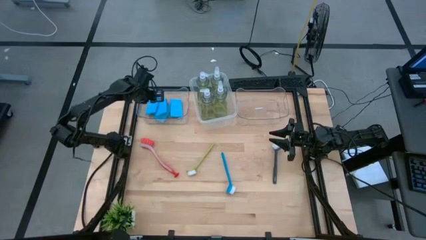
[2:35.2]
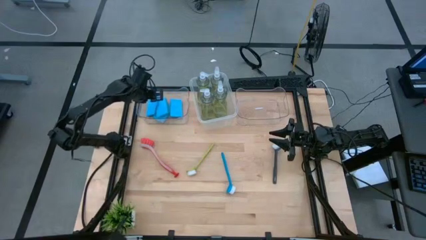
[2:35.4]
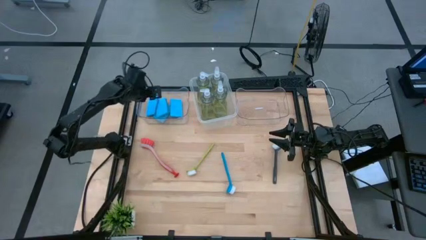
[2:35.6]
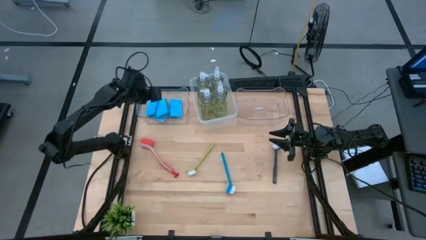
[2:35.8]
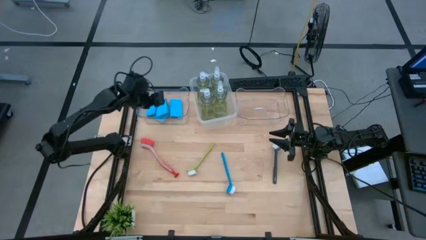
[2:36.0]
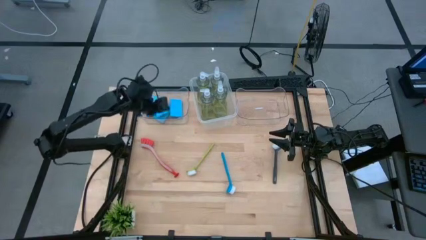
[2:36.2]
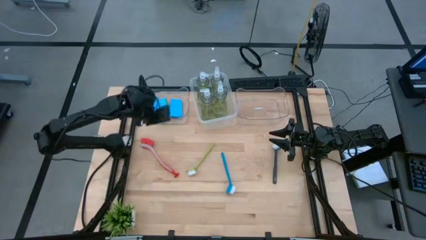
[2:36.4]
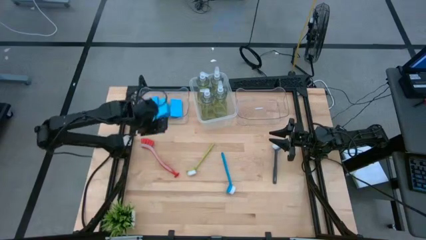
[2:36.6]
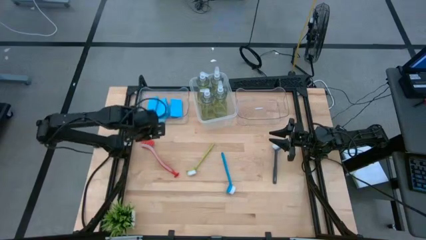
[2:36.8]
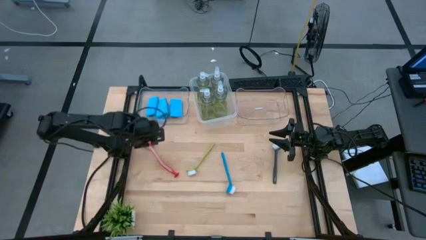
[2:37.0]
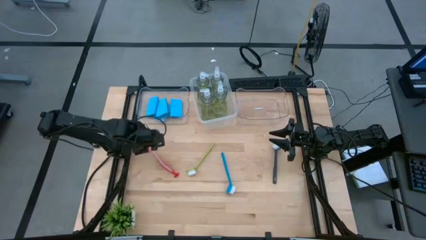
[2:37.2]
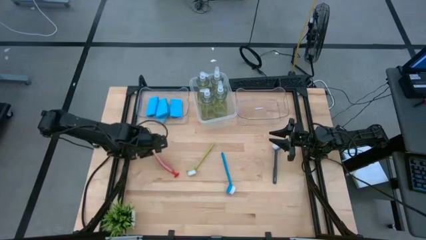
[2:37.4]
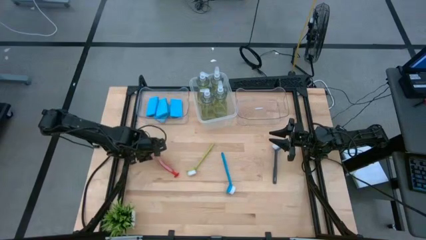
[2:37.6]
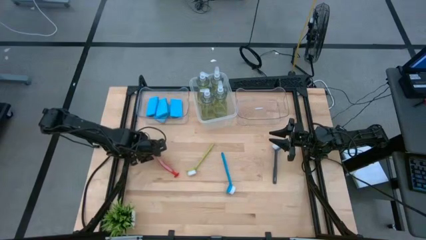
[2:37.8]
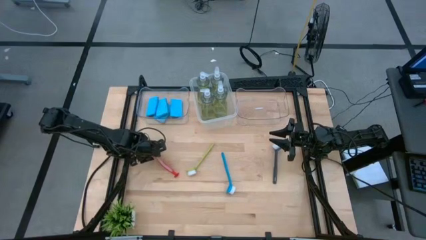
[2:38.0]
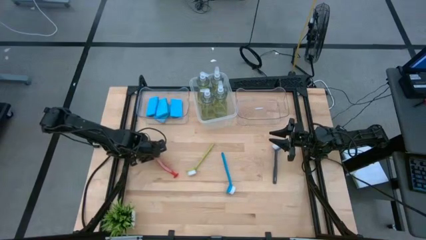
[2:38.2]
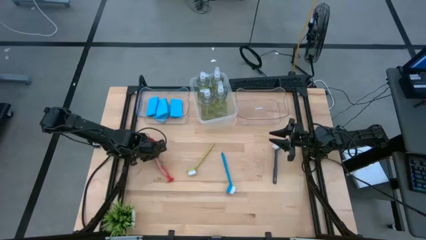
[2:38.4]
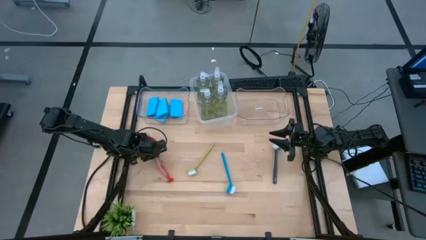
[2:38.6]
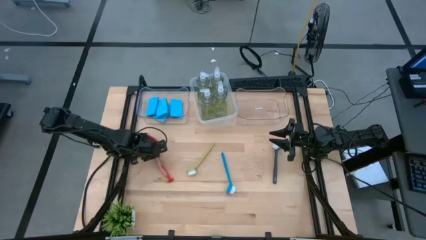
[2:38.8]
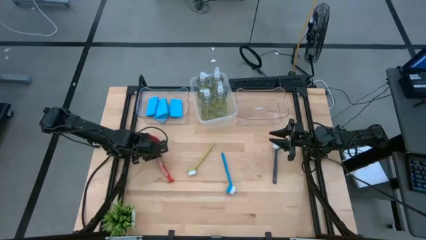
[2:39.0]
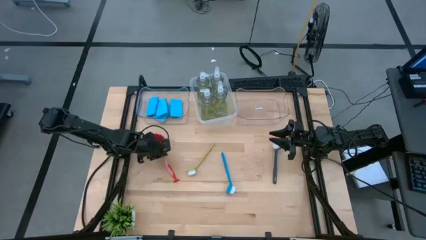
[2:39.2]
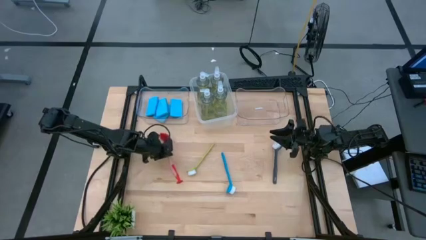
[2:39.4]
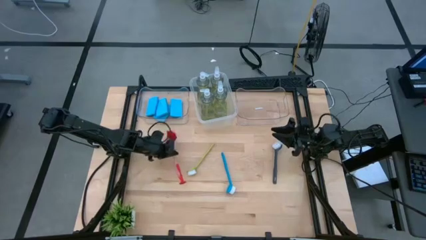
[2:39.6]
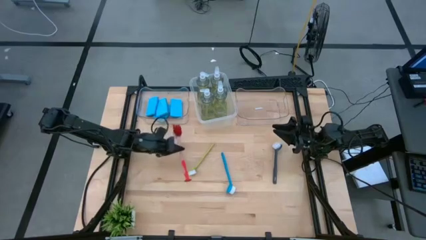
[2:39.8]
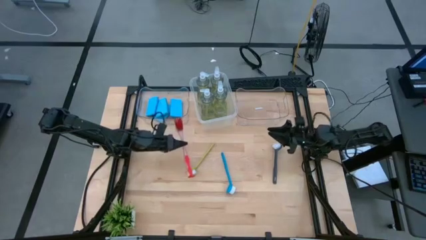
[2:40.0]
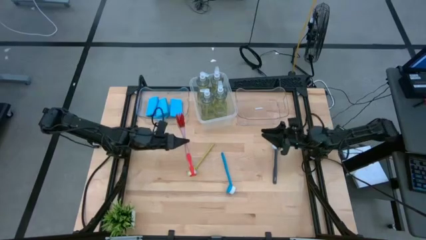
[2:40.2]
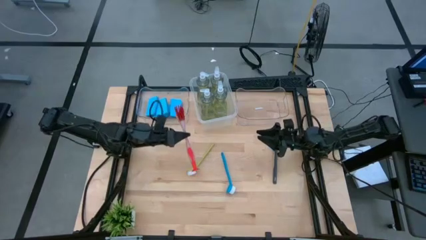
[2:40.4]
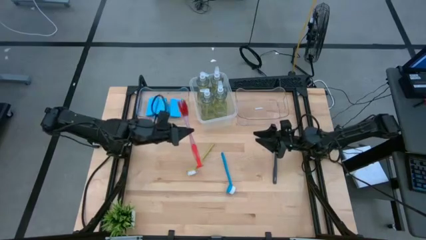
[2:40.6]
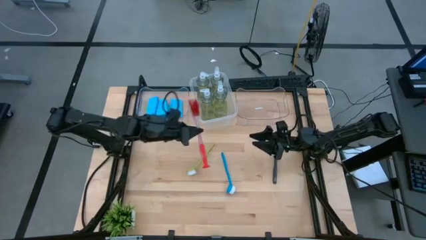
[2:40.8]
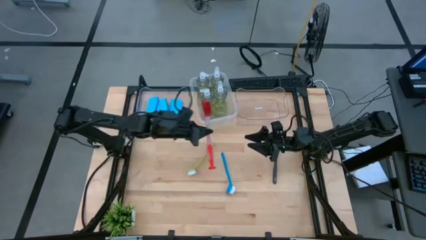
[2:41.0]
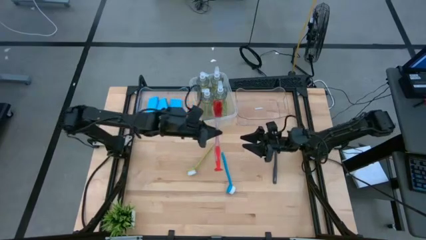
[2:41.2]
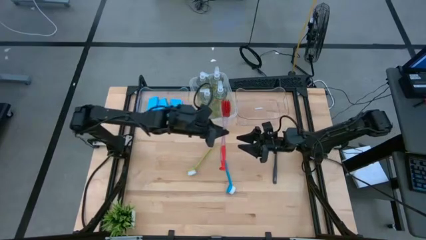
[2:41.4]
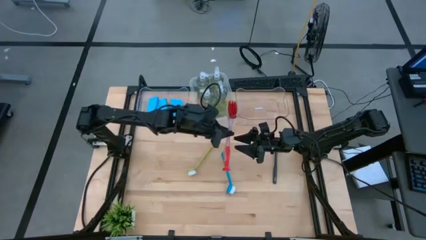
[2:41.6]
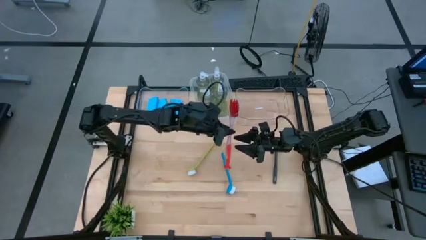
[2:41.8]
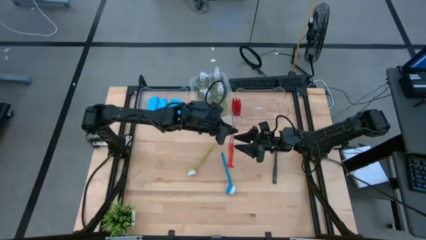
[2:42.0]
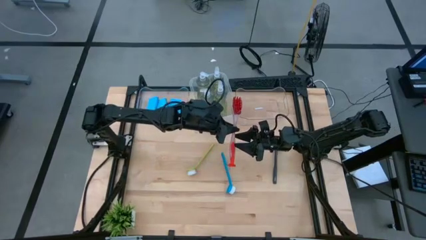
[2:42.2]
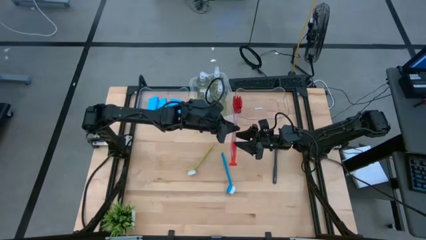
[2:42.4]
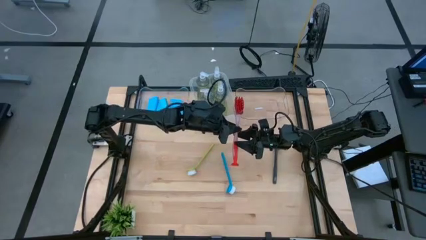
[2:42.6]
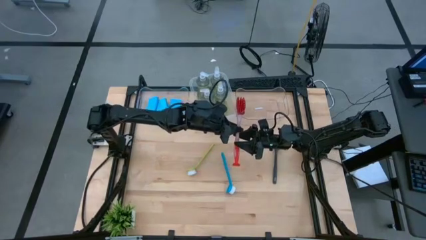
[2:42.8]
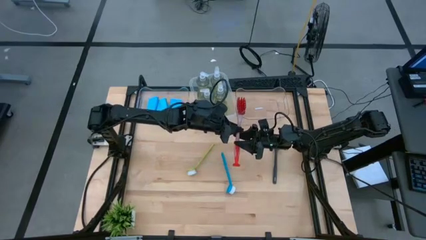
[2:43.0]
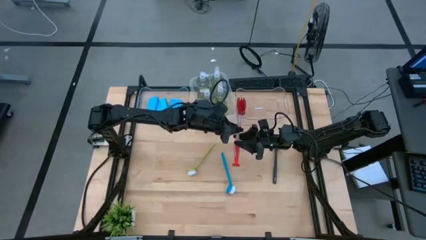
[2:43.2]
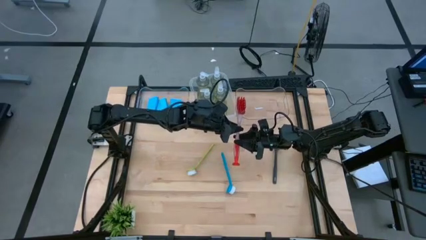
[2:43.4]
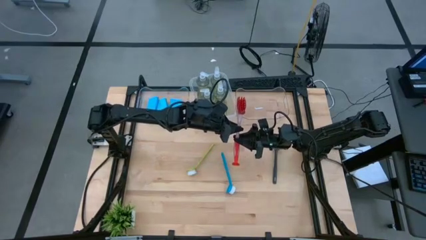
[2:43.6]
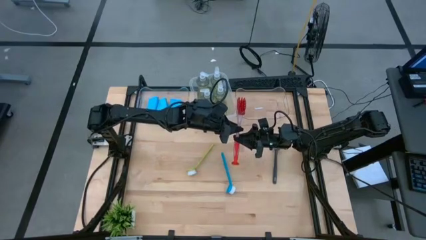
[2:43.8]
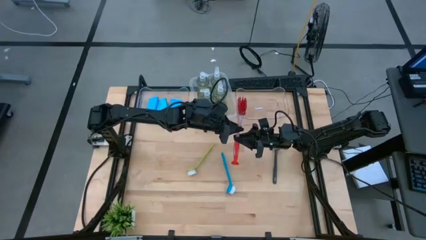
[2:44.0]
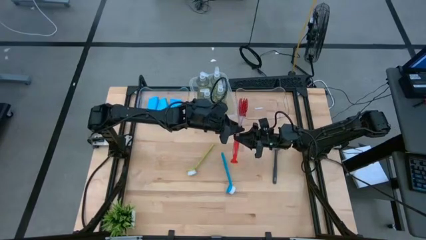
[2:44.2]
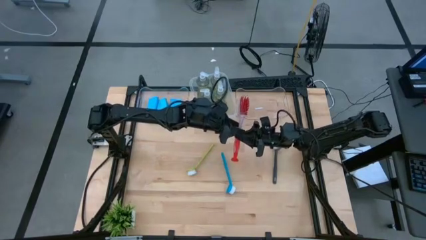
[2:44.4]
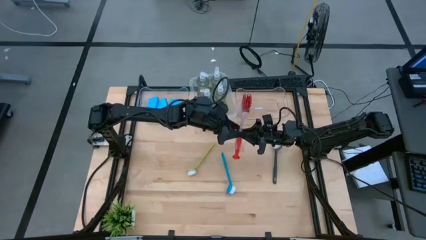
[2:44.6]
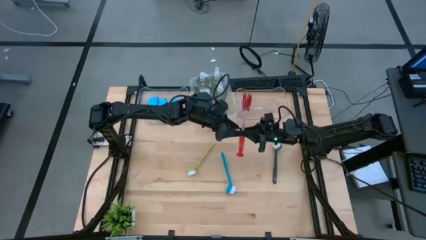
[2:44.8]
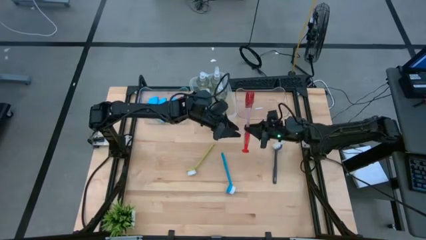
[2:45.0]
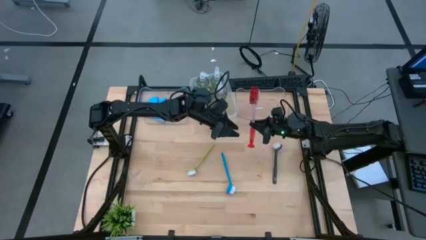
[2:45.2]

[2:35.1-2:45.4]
Task: Pick & Place Kitchen Sink Supplies
Put the red dish brush into the right transparent bin

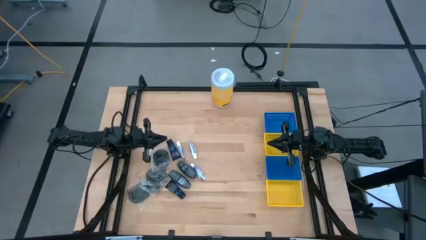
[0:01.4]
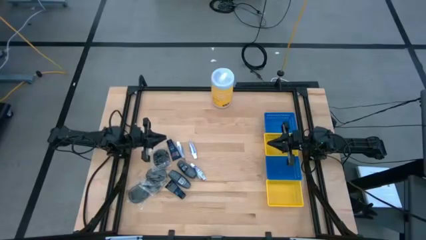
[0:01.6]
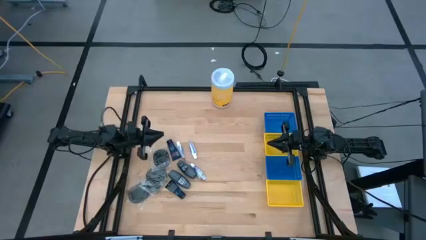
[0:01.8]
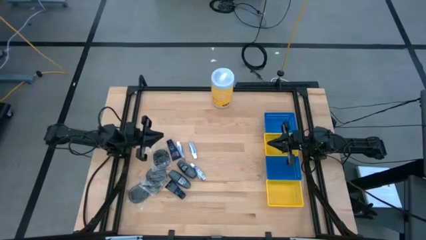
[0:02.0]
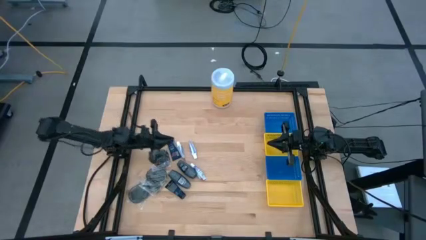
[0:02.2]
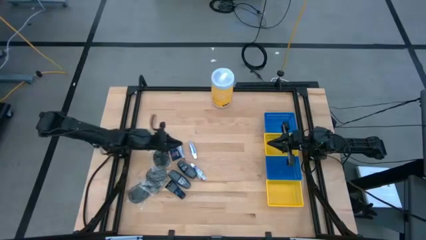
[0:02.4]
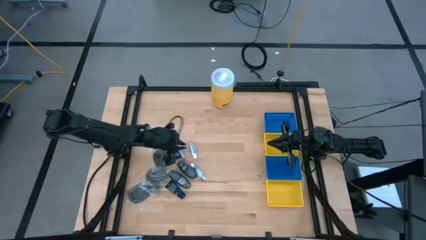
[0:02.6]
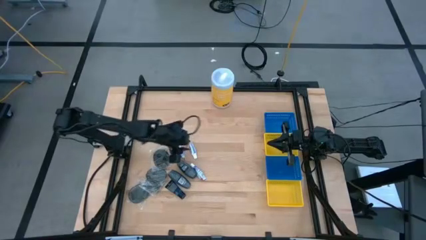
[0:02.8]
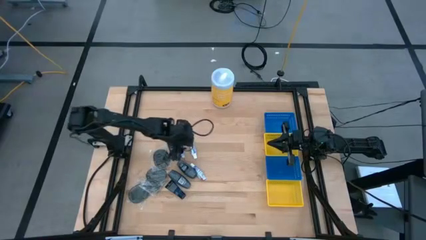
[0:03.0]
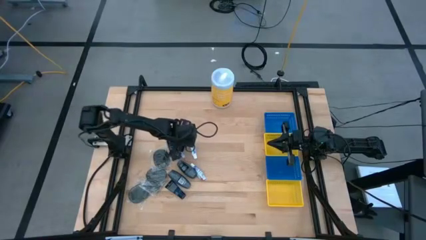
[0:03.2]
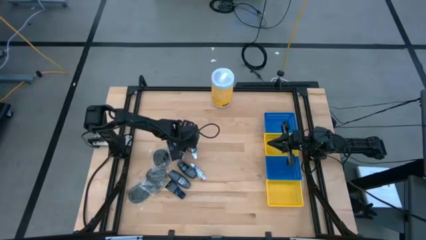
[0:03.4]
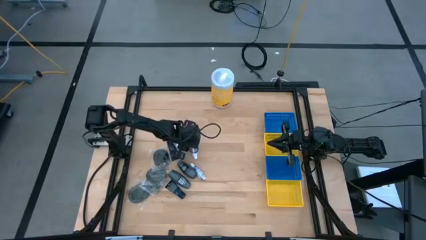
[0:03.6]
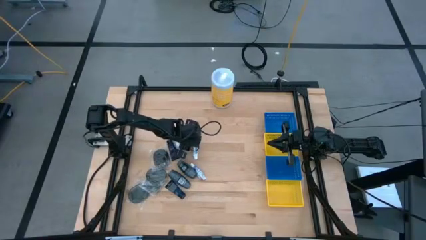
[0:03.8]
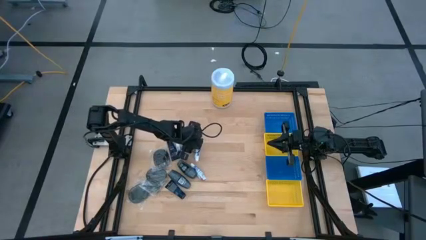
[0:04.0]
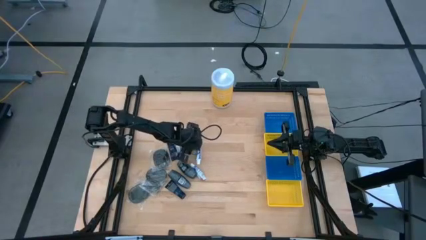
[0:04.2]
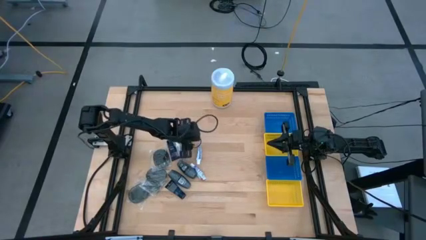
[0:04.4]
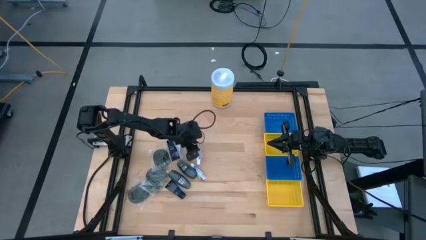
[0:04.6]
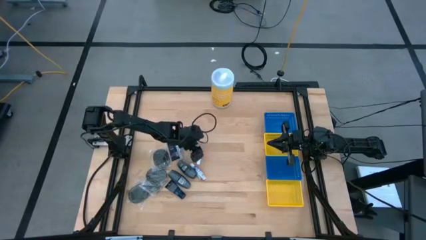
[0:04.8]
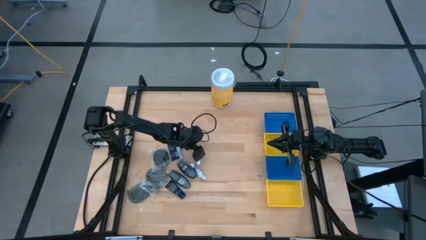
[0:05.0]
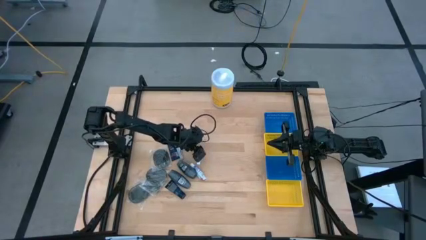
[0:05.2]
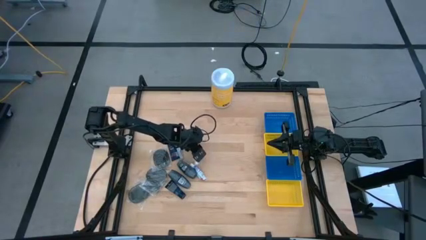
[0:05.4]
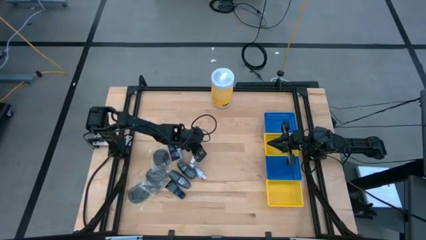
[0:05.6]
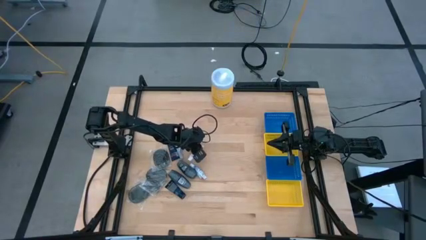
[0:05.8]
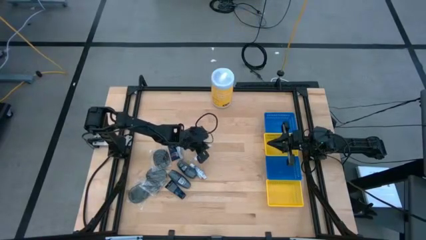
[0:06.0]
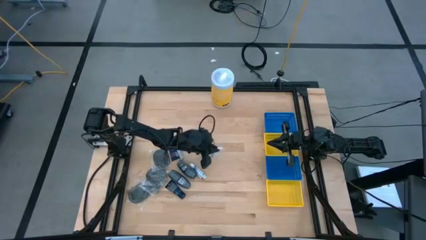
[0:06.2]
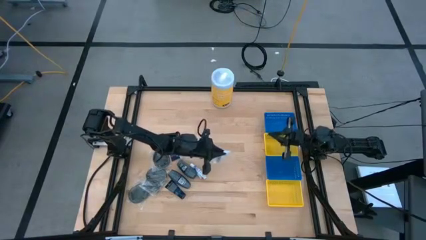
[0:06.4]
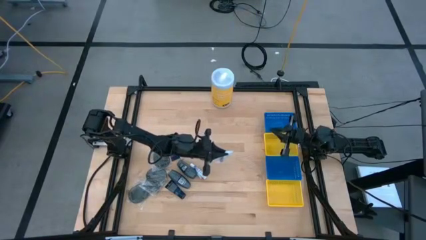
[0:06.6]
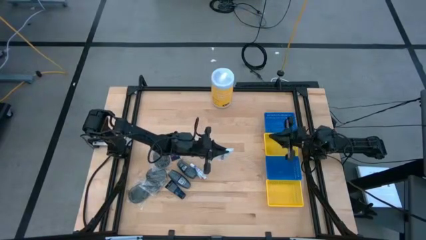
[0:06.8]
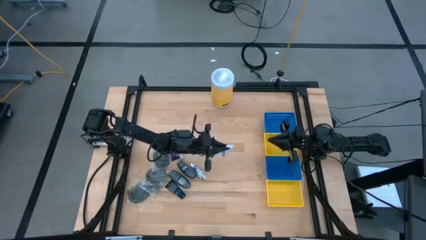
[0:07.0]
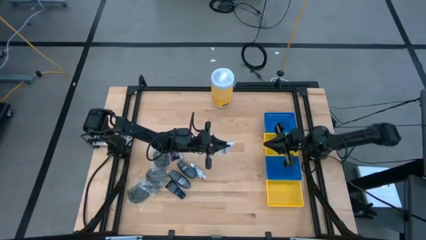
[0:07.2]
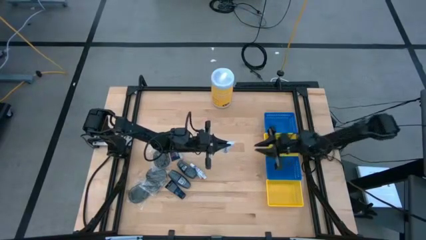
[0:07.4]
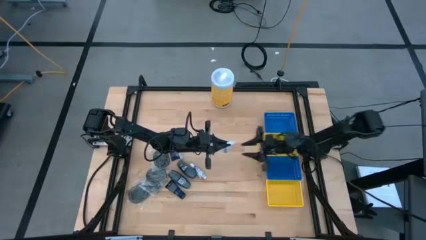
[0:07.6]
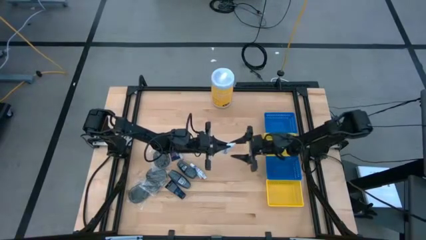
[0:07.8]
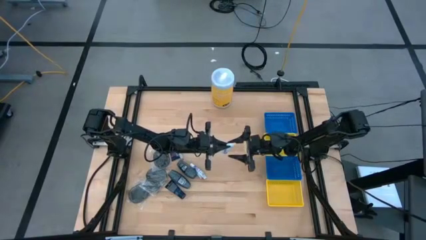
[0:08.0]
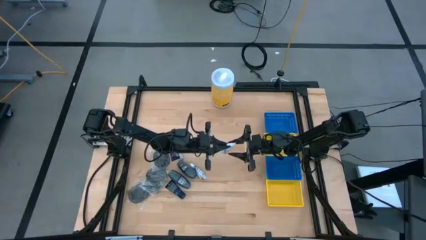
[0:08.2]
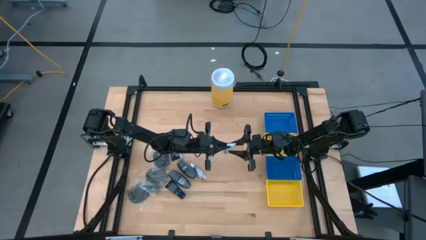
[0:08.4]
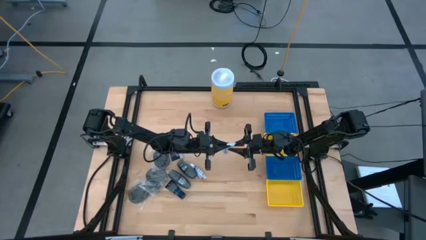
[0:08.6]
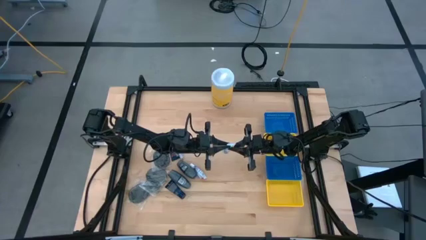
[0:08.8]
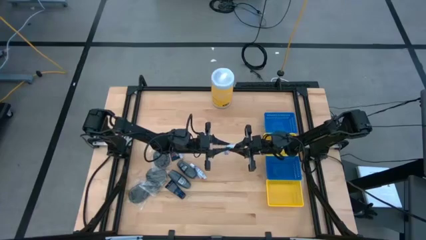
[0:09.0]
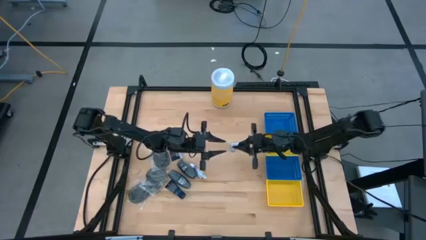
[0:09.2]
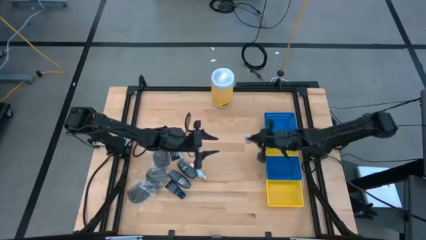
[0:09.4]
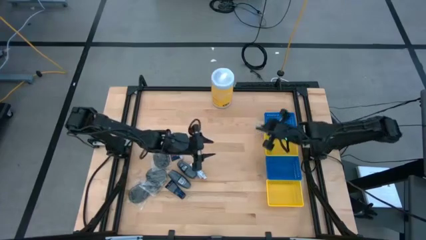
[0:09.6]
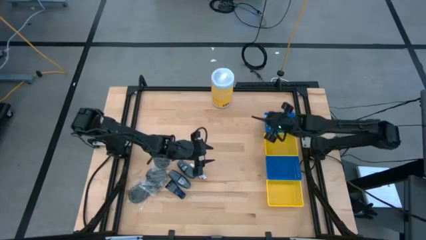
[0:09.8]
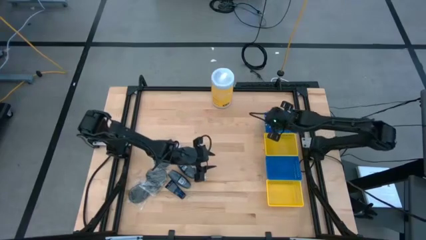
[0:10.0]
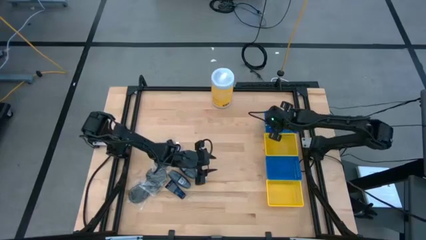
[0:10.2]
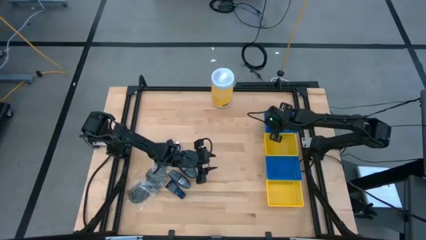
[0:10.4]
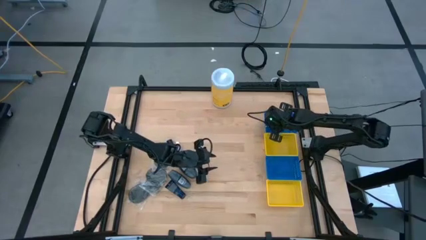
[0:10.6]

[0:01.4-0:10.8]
Task: Pick & Place Travel size toiletries
Put the white toothpaste into the top blue bin
